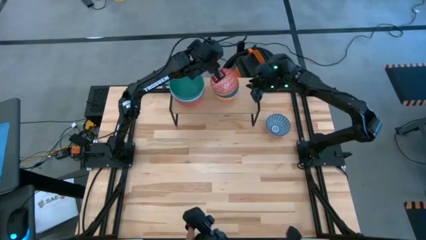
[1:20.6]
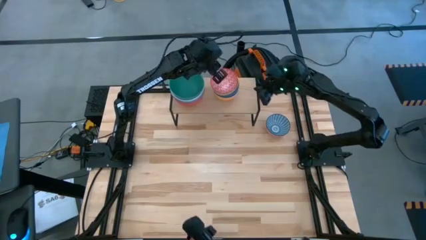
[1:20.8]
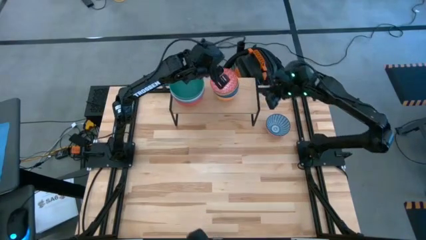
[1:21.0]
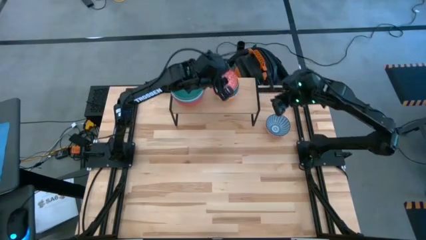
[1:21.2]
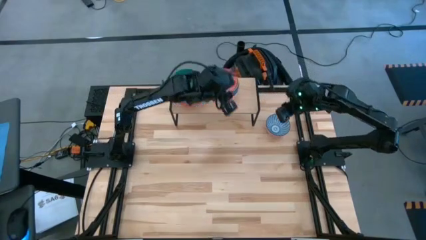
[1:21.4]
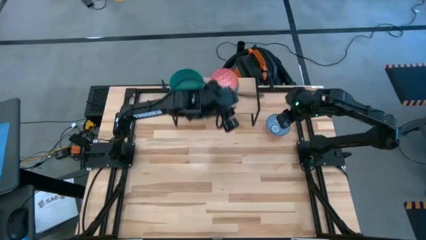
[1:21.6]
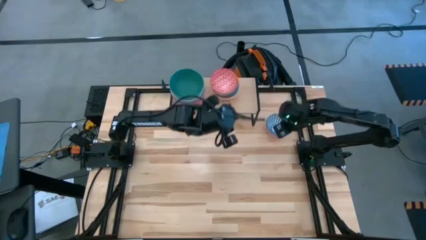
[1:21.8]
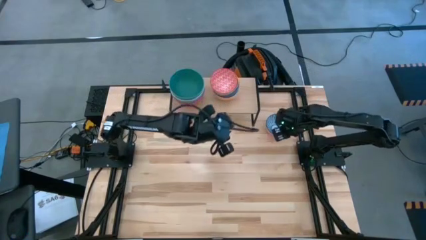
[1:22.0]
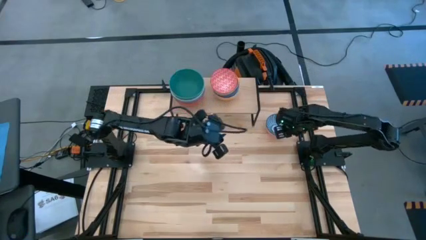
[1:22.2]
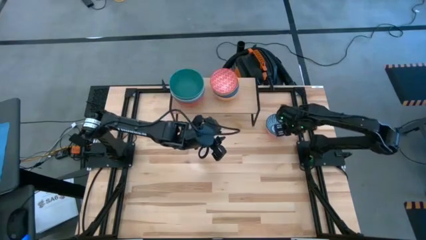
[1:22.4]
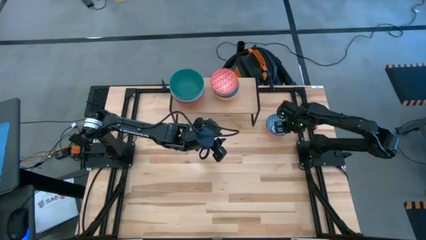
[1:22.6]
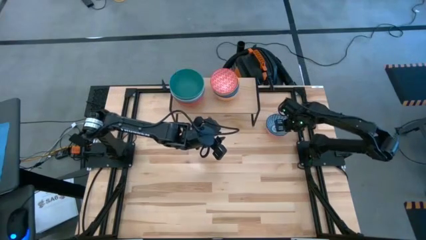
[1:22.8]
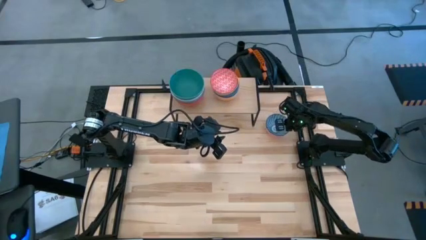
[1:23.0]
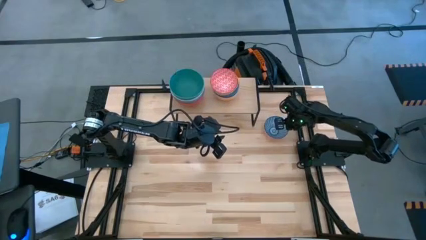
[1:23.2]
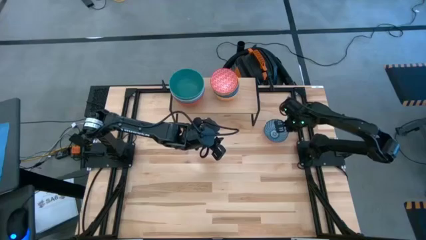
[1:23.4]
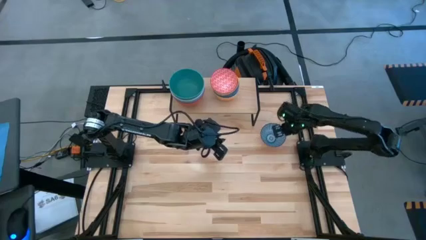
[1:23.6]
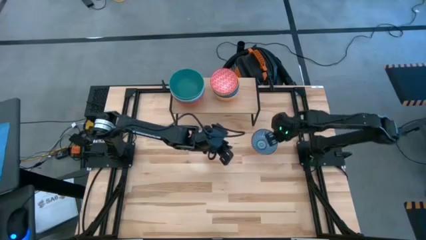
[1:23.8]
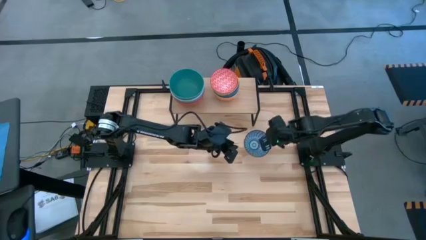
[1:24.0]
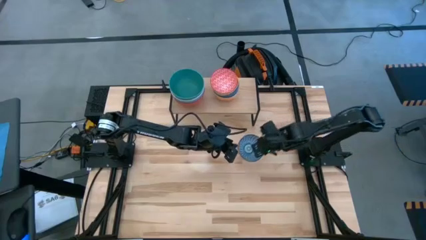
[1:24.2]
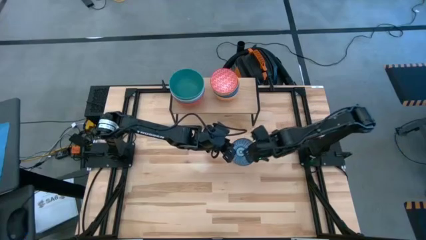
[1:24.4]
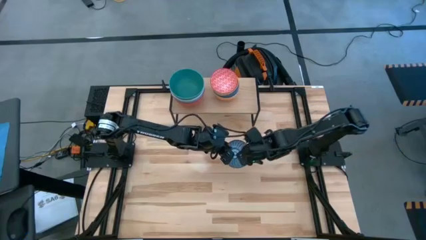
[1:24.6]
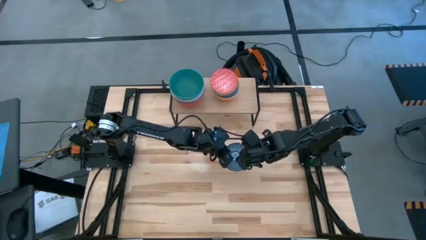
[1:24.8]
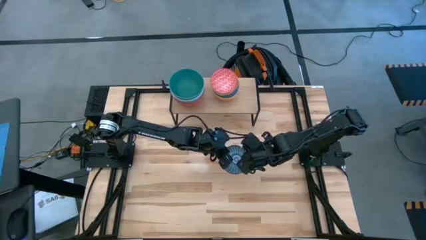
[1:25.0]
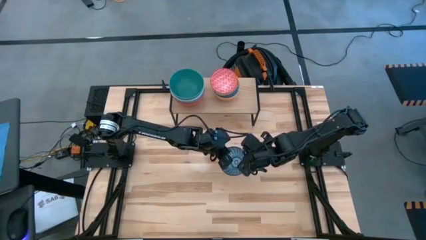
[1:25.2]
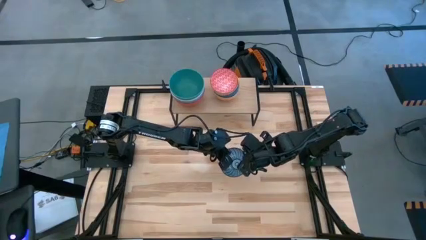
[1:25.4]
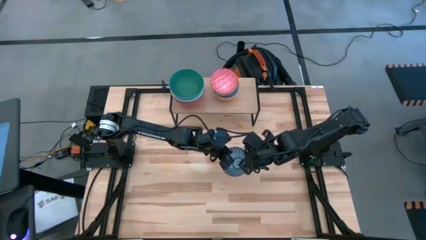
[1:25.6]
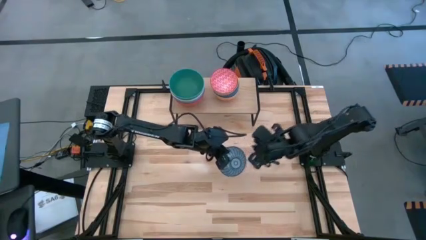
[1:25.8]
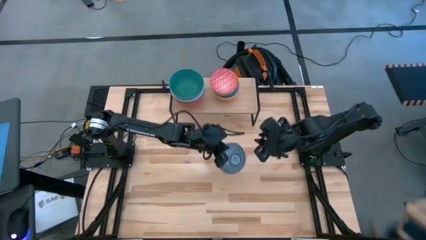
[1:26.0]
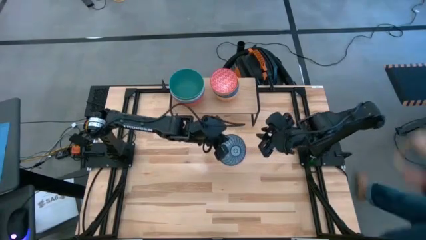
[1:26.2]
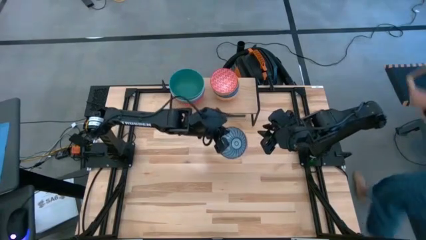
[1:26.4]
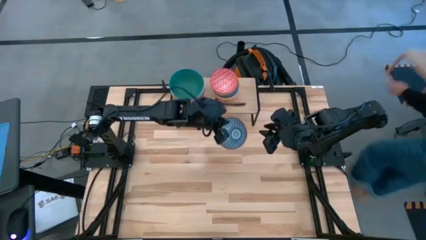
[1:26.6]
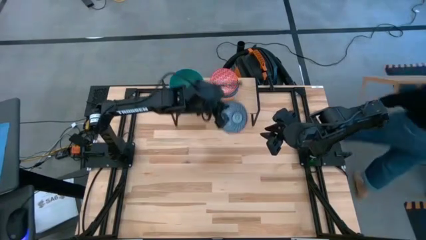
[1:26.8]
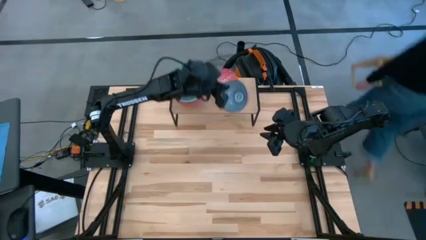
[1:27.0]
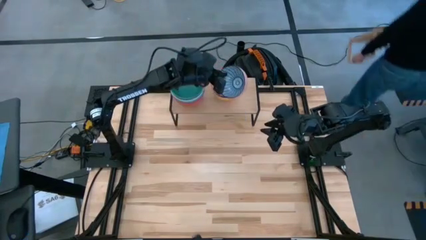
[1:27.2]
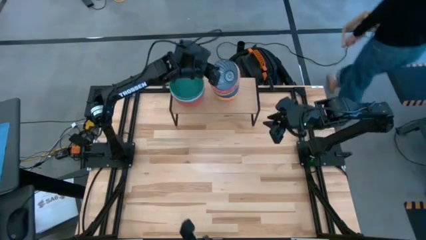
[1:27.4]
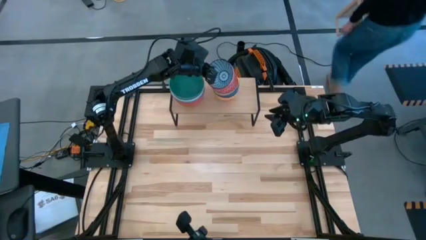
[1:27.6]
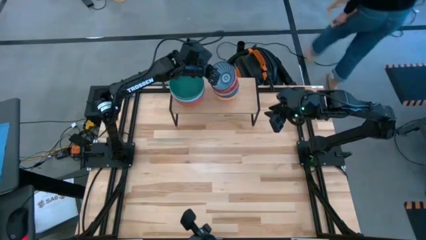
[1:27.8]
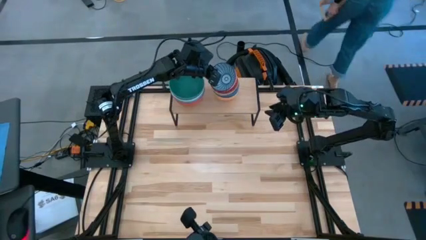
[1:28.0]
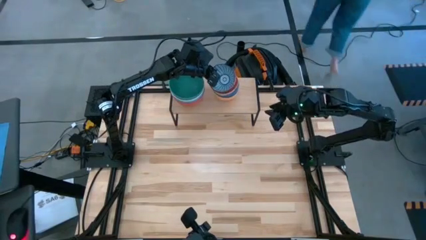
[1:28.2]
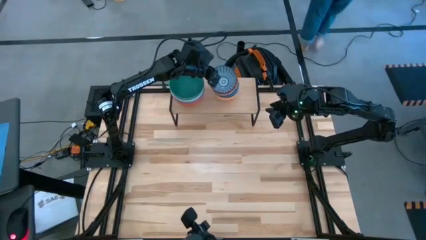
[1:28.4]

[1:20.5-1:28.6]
Task: Place and stack bowls onto a shelf
Stack the blue pattern bowl on top of the red pattern bowl on the shelf

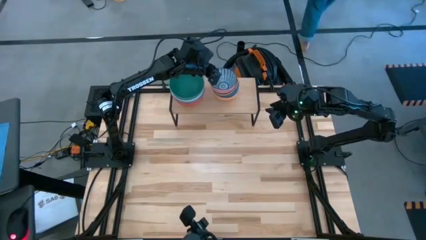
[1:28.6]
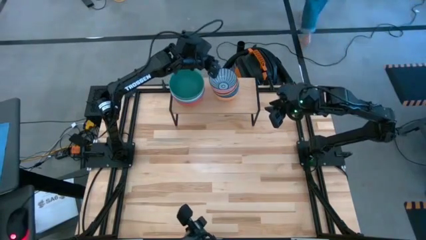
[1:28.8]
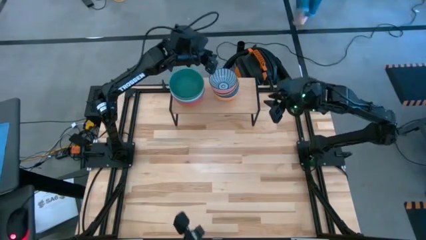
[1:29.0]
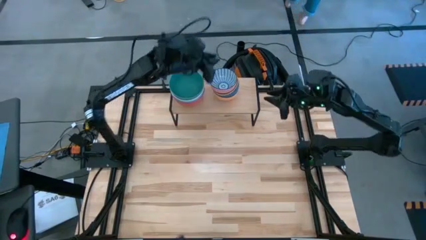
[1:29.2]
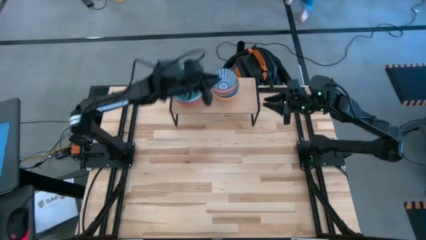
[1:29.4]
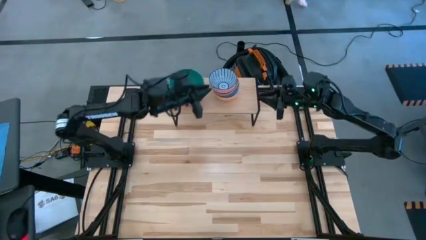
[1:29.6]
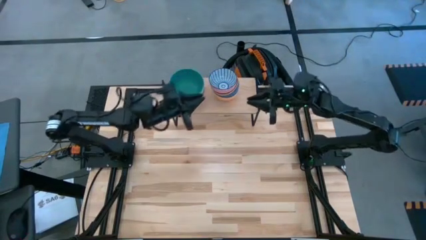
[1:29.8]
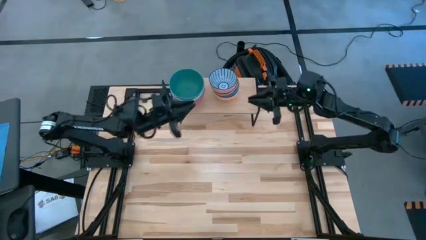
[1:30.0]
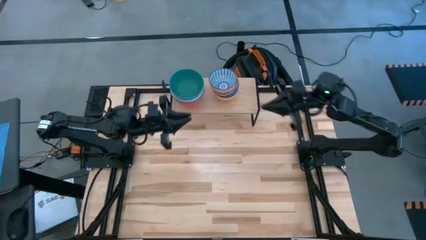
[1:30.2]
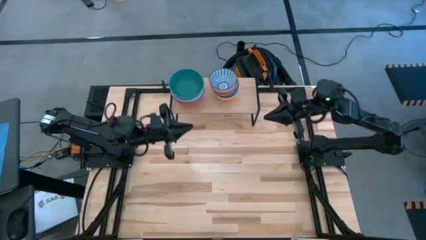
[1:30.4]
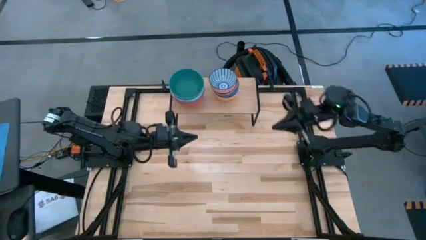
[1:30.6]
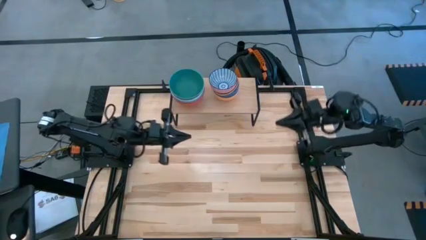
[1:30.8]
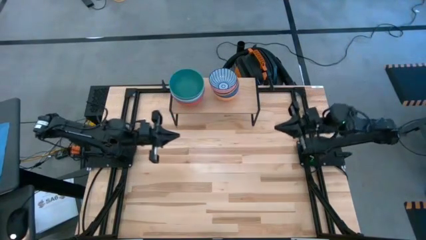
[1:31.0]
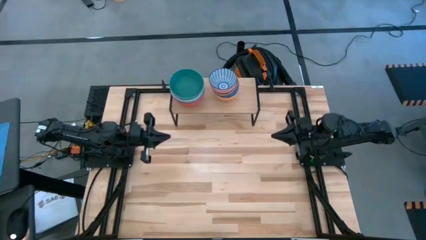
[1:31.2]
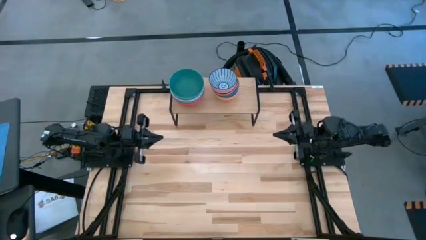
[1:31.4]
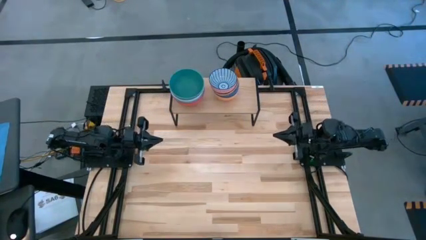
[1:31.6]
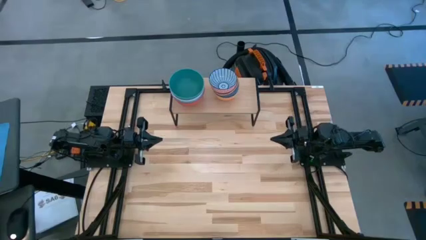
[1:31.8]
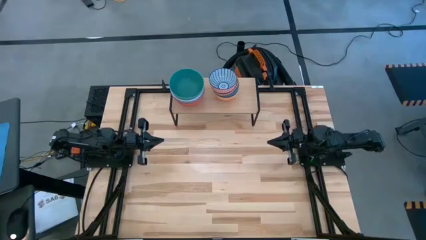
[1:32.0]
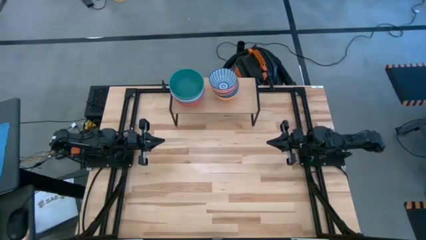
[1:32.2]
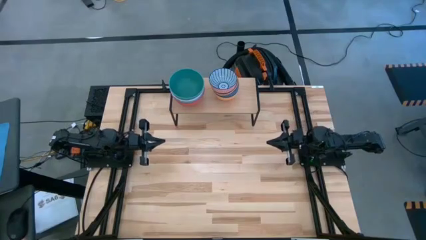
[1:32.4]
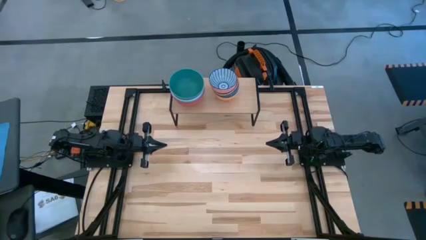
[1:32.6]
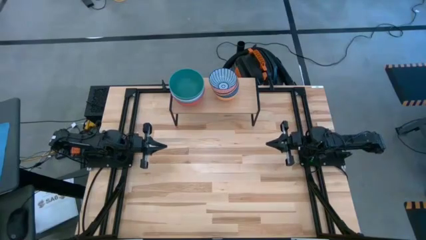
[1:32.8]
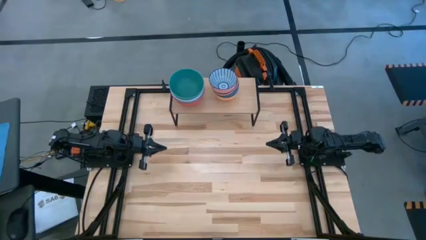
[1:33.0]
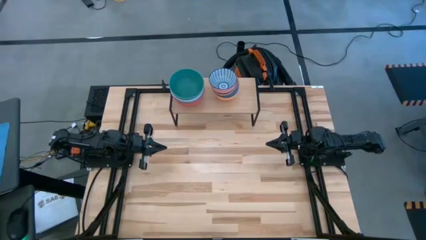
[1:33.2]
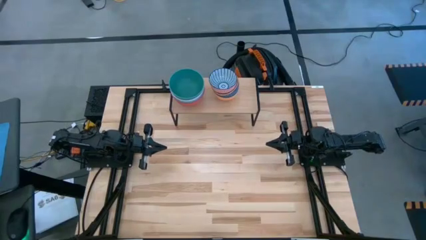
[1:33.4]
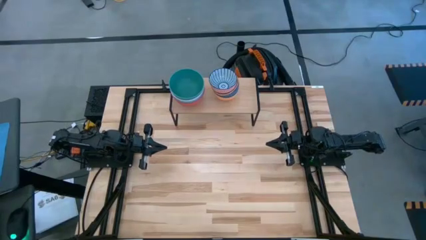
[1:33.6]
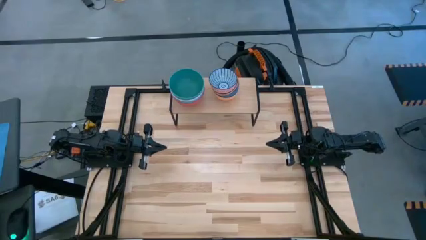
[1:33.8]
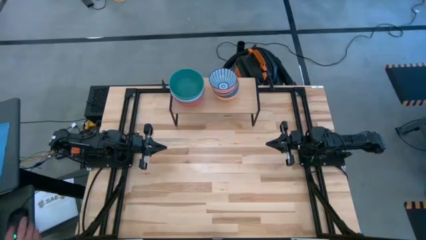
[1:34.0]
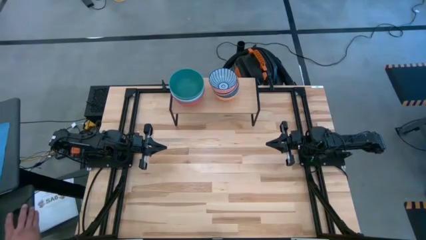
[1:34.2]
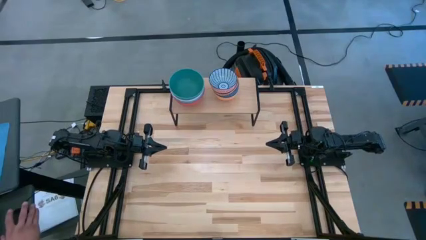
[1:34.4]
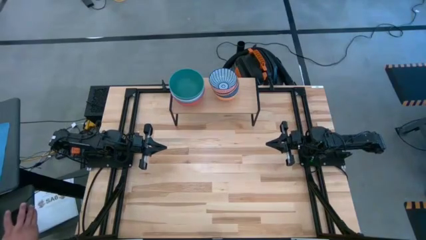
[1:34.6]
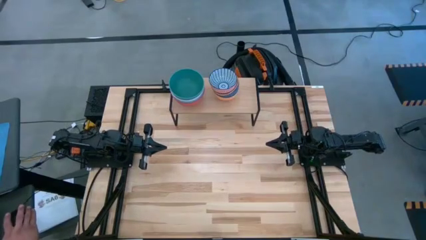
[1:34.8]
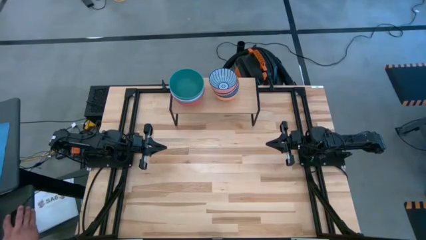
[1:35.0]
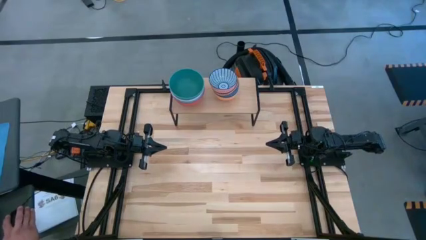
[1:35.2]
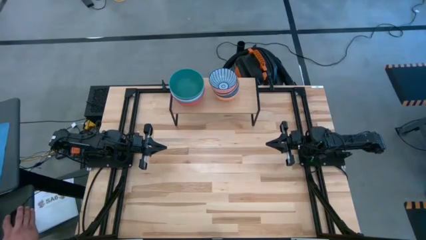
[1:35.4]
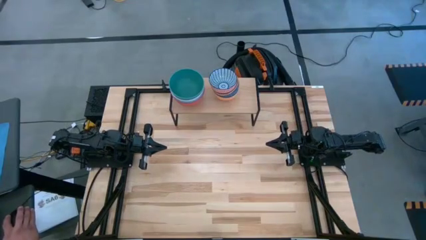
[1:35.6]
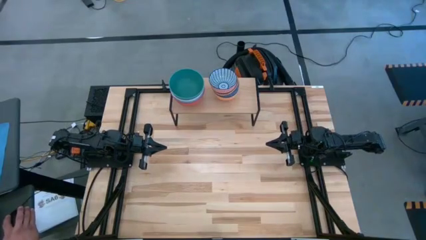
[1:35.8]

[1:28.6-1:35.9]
Return to Home Position

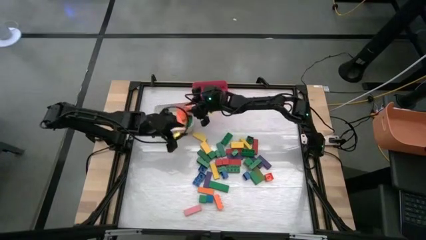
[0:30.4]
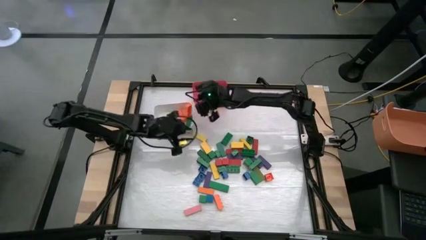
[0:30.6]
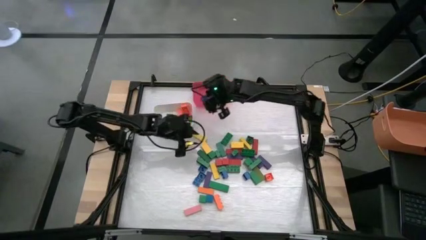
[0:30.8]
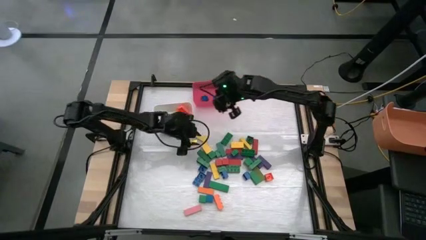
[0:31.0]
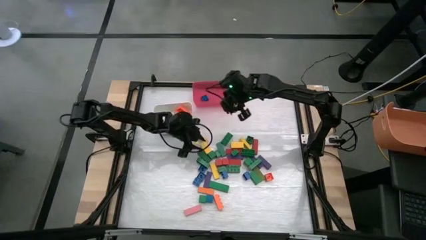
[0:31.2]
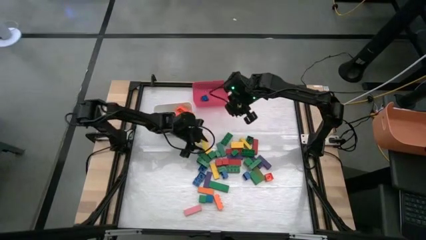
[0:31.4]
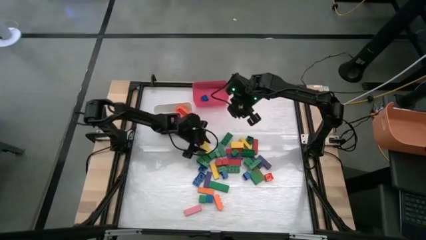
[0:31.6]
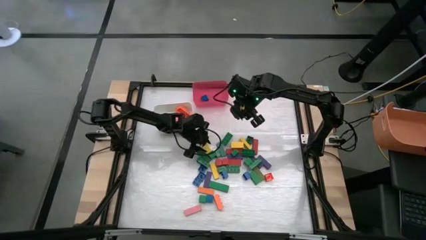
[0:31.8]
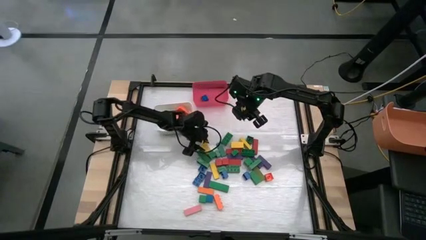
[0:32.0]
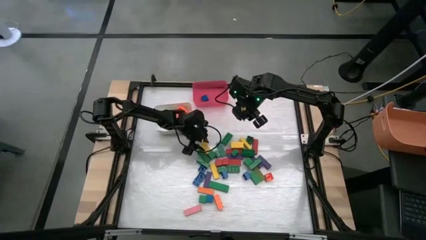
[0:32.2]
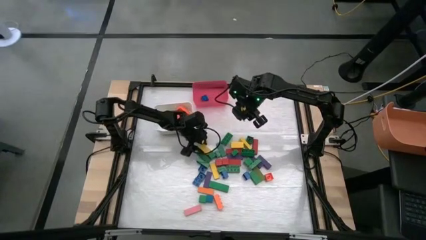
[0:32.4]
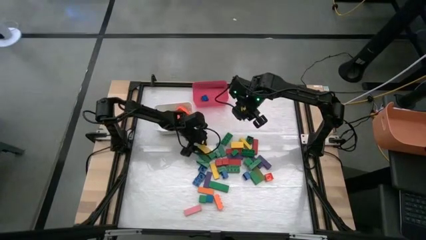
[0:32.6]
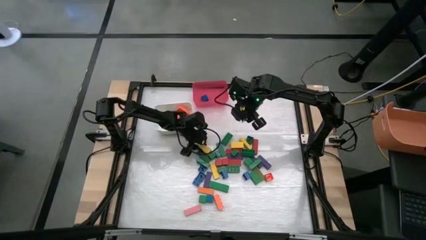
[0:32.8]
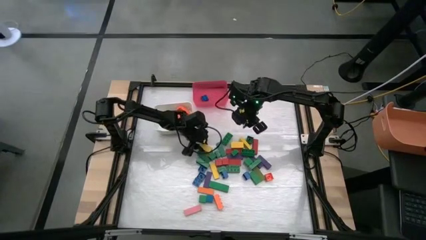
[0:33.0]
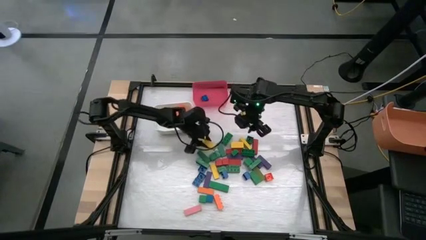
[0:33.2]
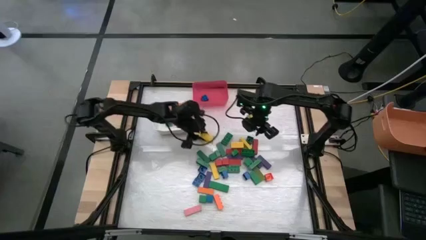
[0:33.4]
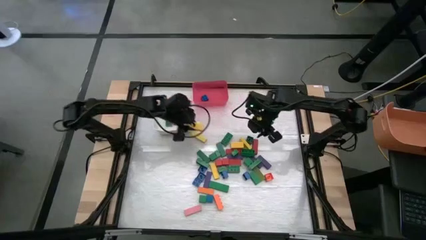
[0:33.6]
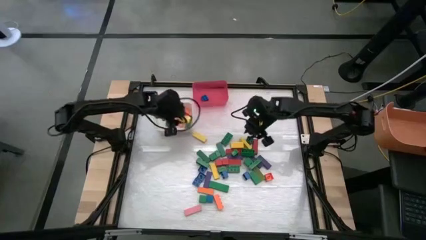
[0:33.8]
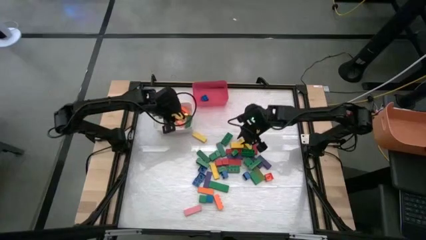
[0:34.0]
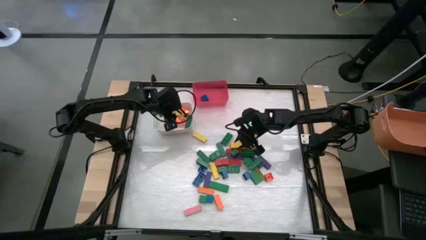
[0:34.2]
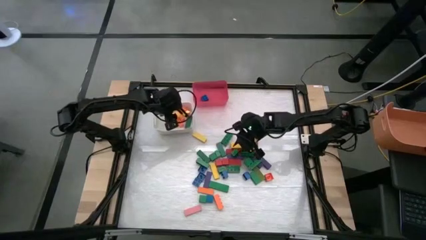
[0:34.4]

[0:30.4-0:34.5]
Task: Sort blocks by size
Put the large yellow wooden block into the white bin
